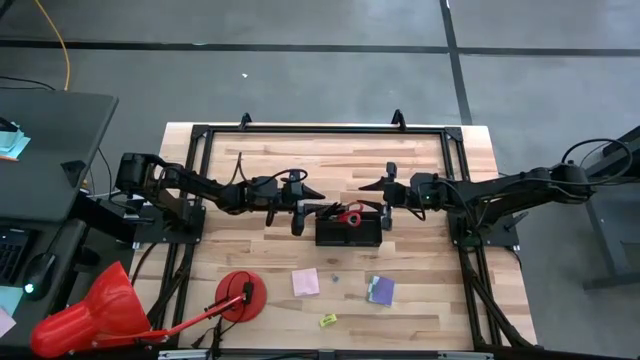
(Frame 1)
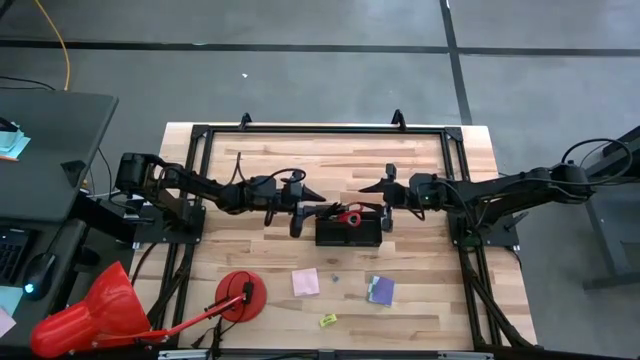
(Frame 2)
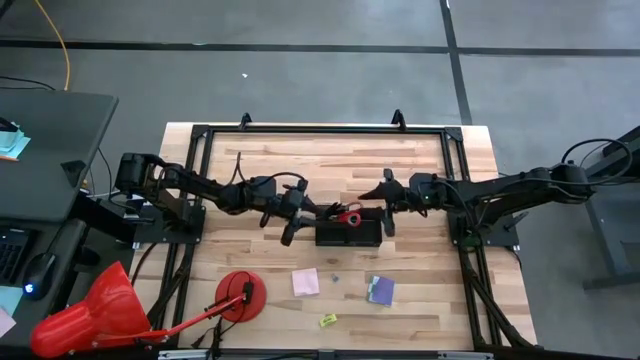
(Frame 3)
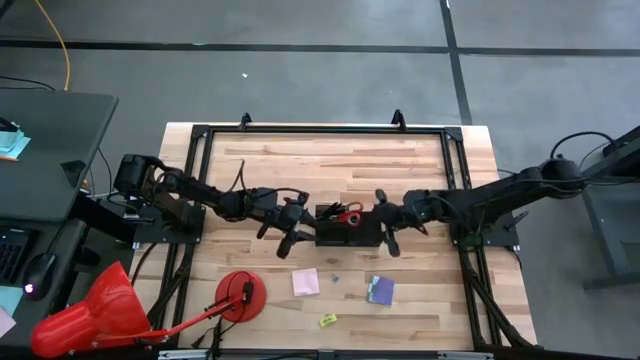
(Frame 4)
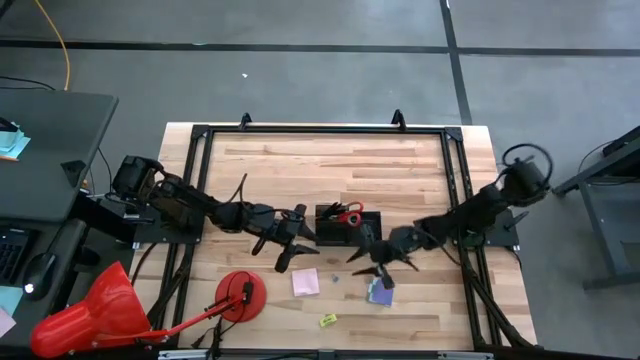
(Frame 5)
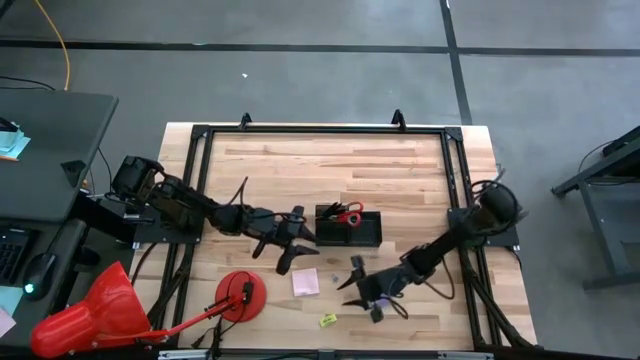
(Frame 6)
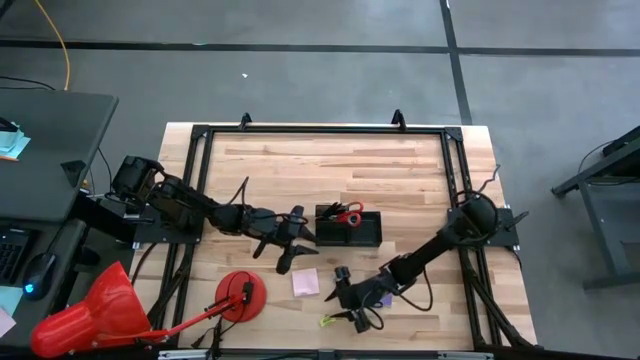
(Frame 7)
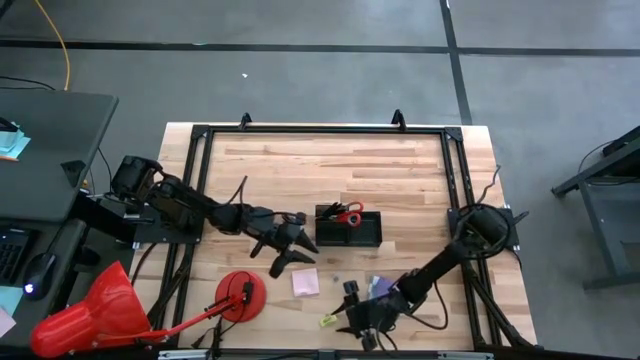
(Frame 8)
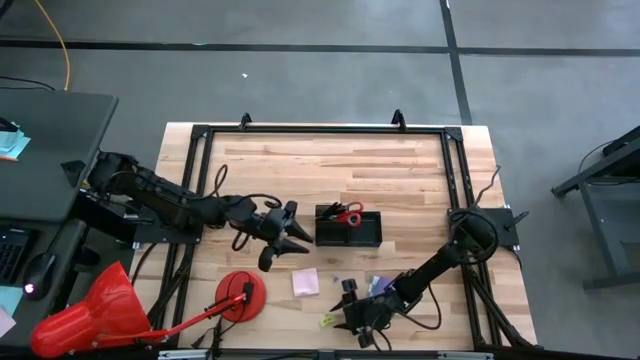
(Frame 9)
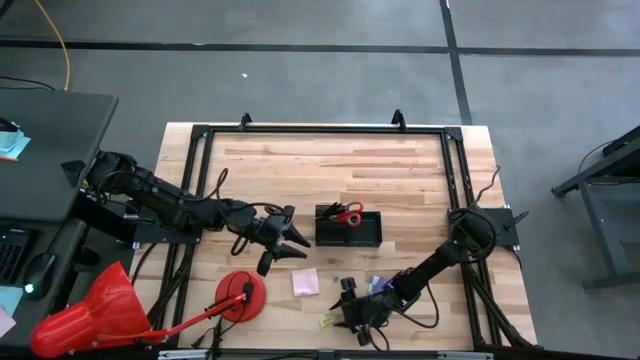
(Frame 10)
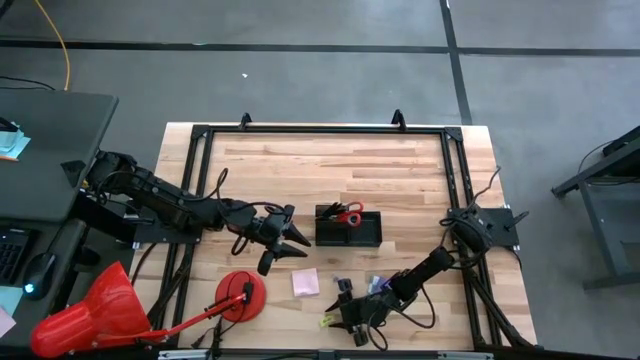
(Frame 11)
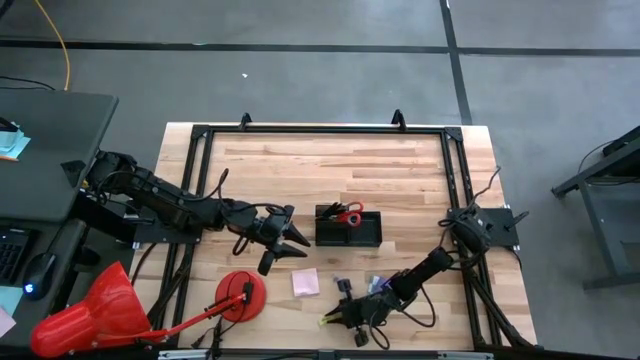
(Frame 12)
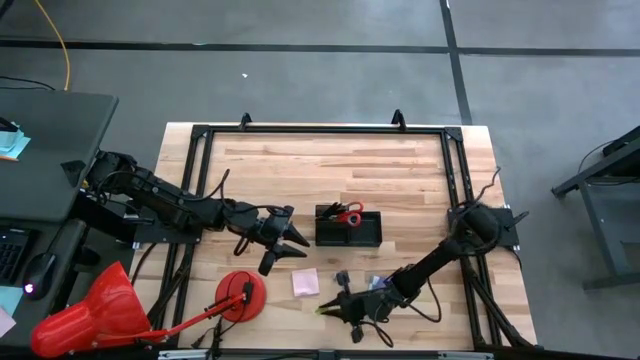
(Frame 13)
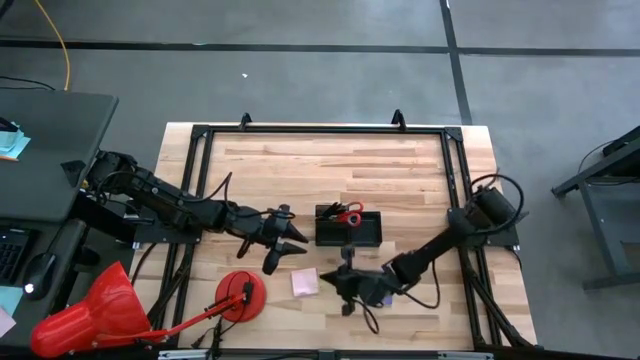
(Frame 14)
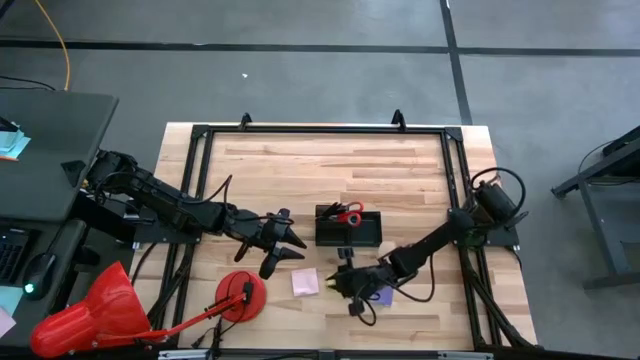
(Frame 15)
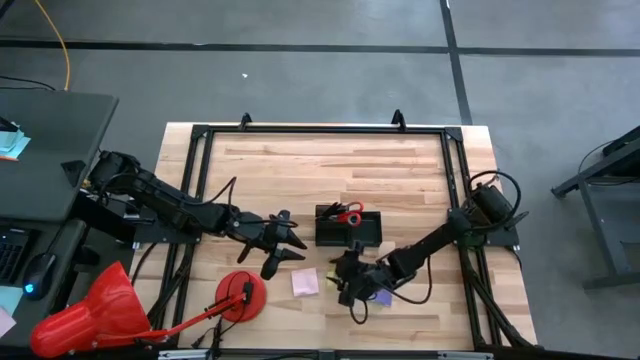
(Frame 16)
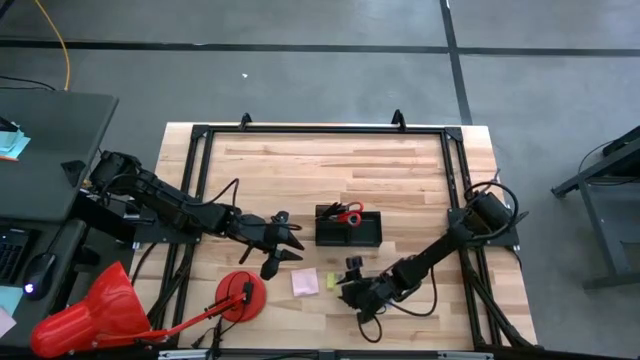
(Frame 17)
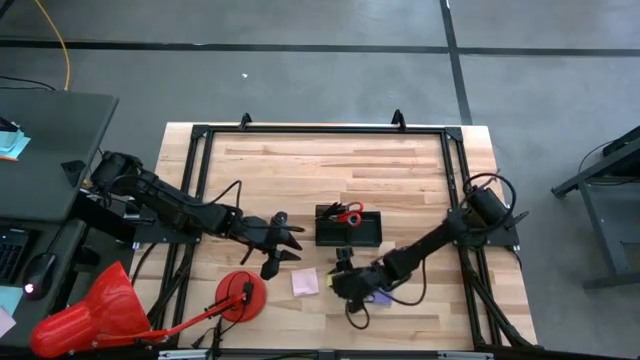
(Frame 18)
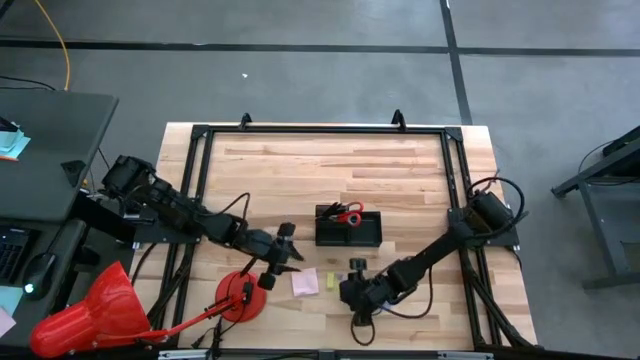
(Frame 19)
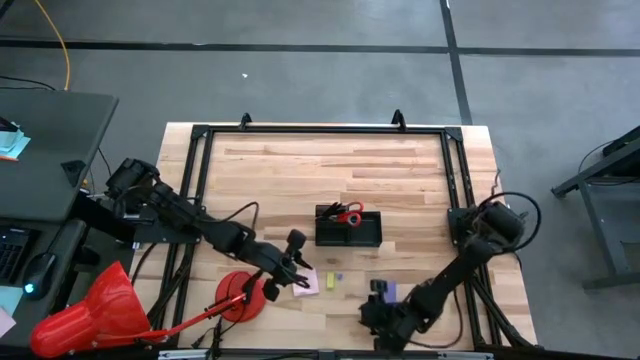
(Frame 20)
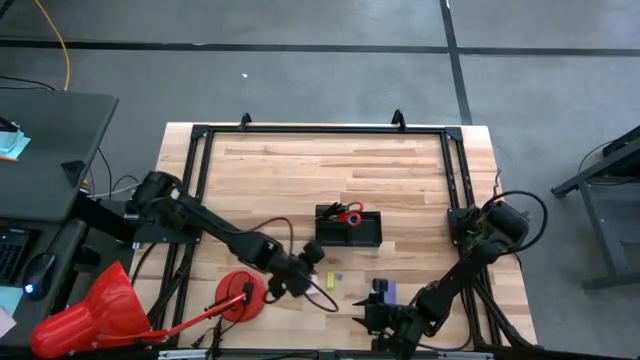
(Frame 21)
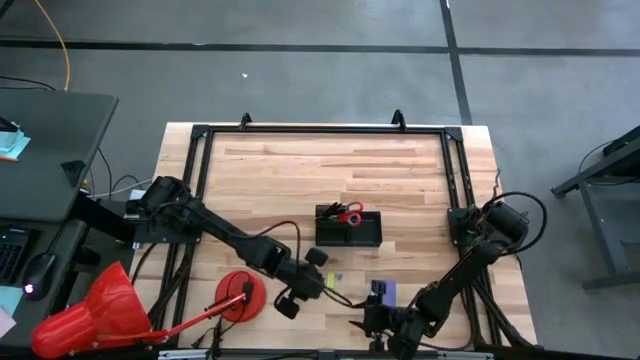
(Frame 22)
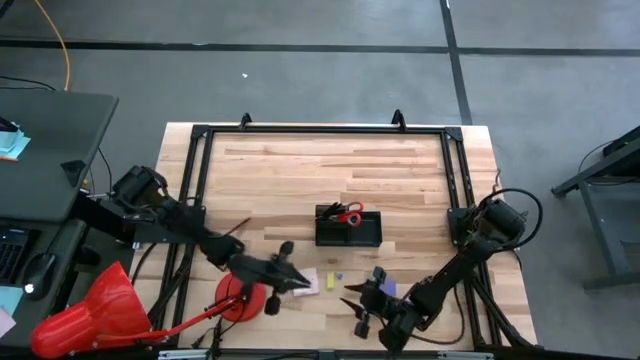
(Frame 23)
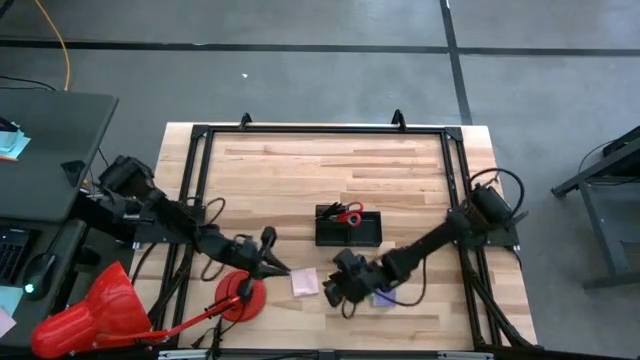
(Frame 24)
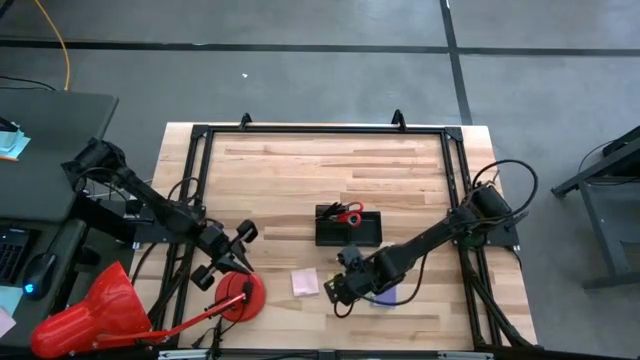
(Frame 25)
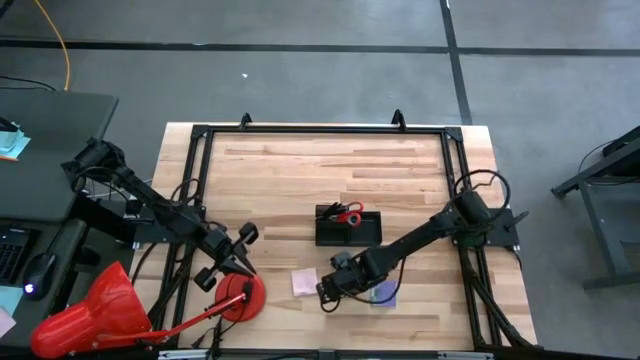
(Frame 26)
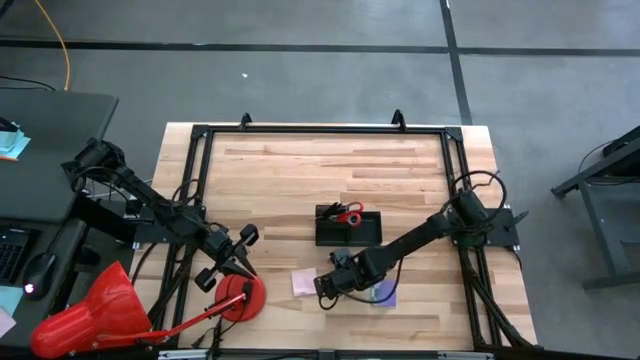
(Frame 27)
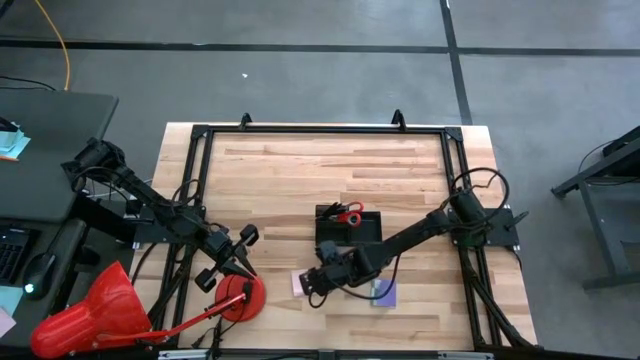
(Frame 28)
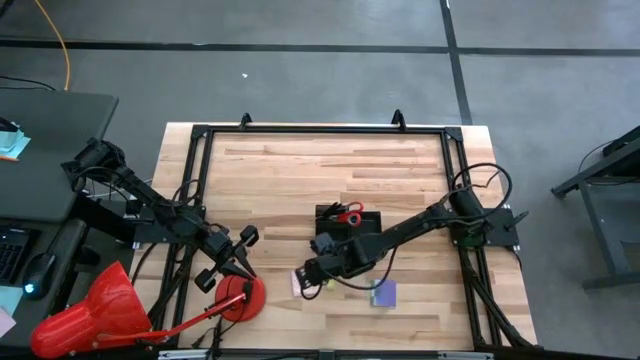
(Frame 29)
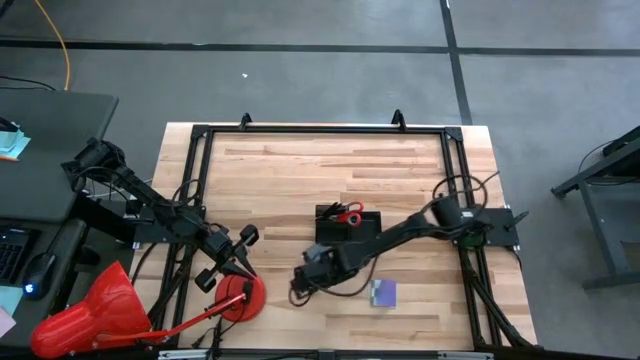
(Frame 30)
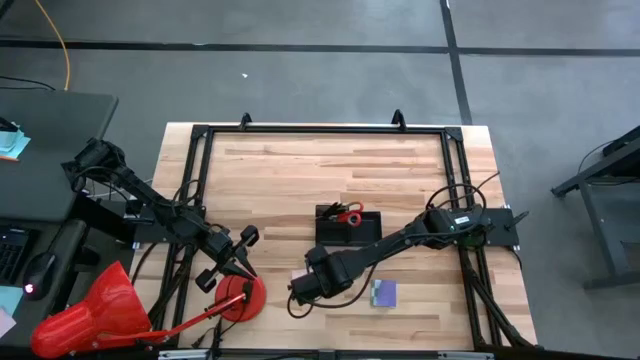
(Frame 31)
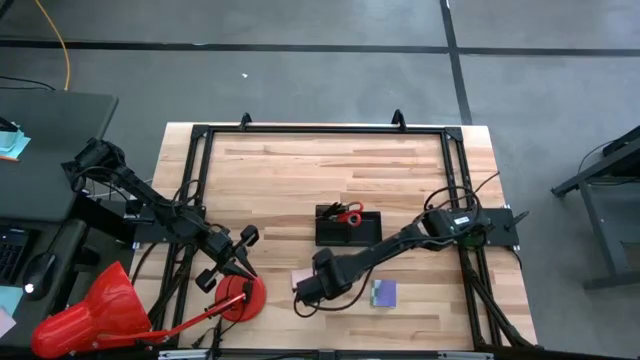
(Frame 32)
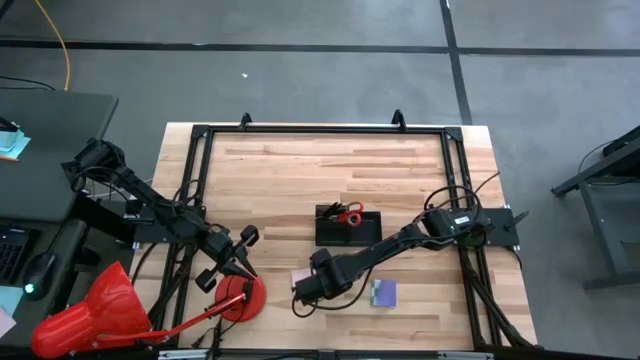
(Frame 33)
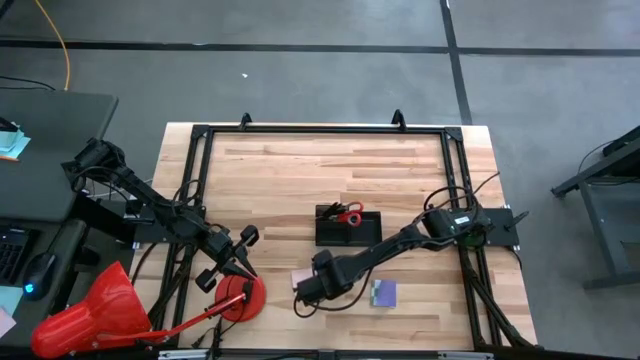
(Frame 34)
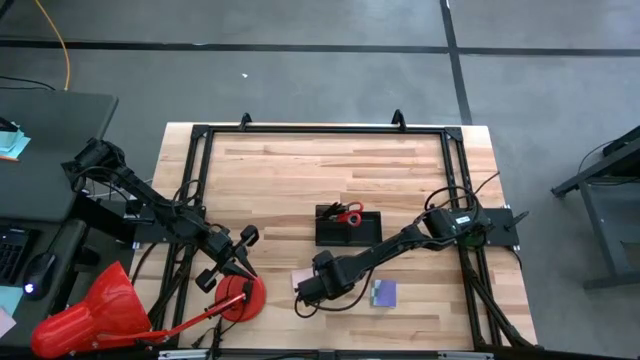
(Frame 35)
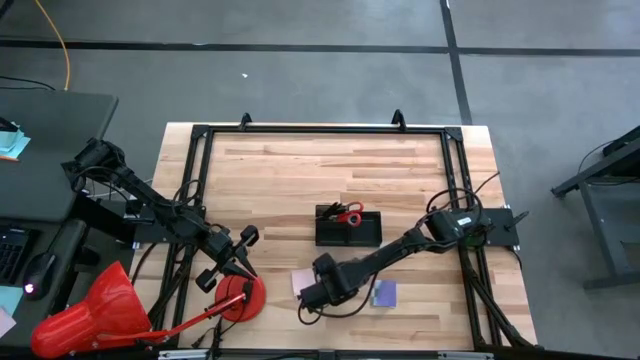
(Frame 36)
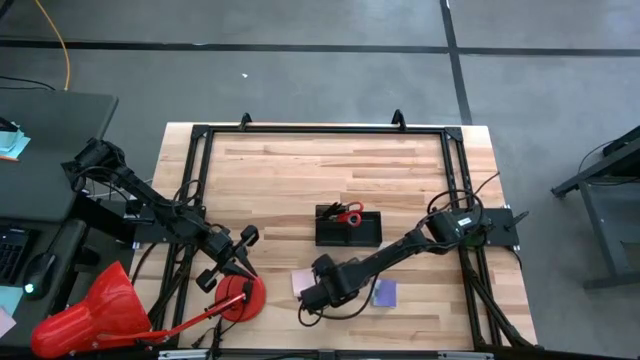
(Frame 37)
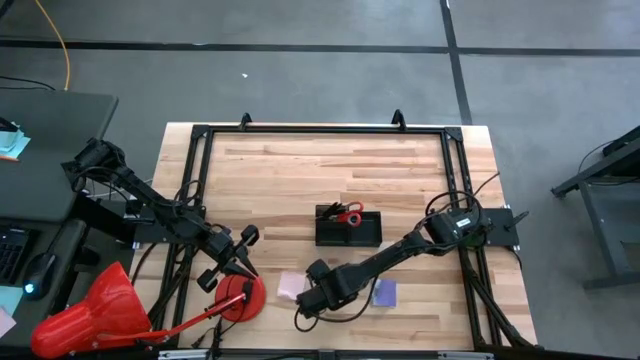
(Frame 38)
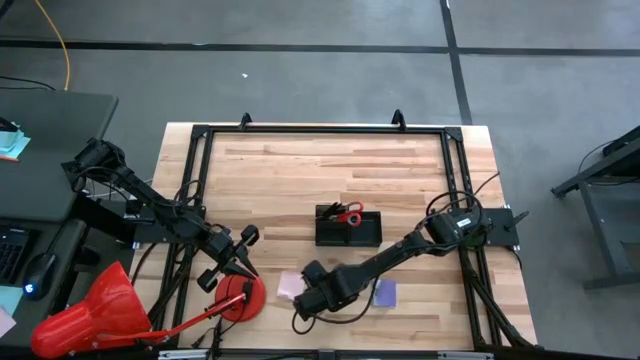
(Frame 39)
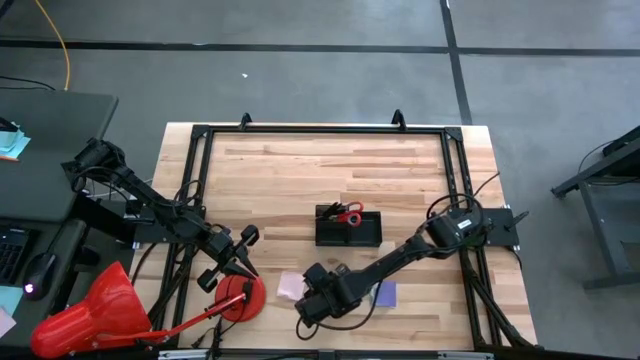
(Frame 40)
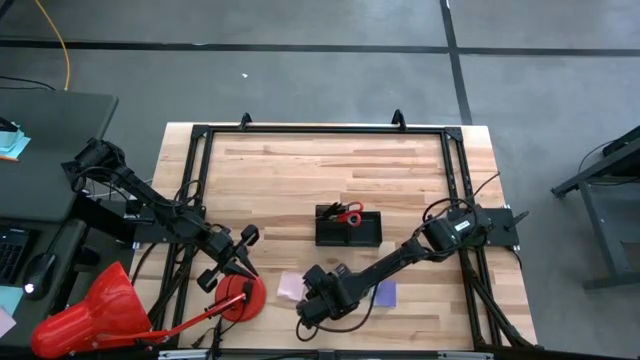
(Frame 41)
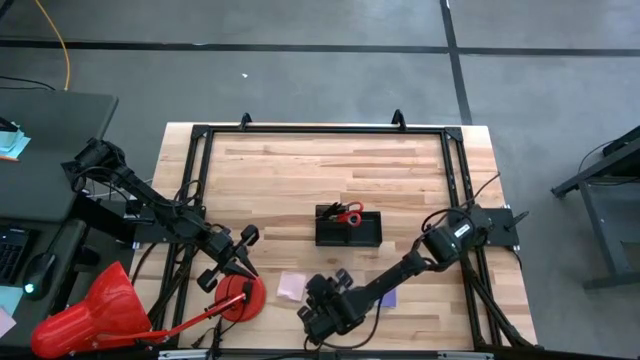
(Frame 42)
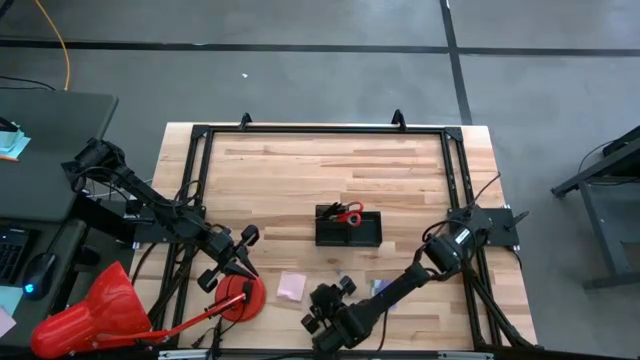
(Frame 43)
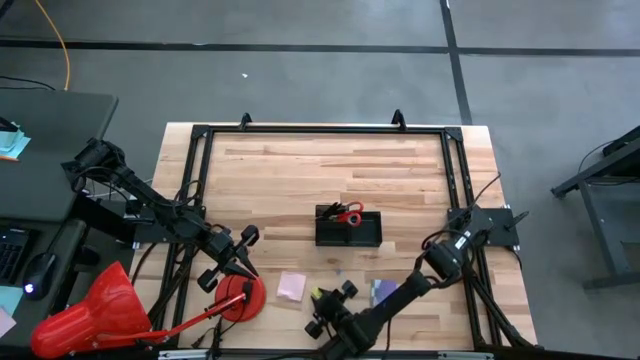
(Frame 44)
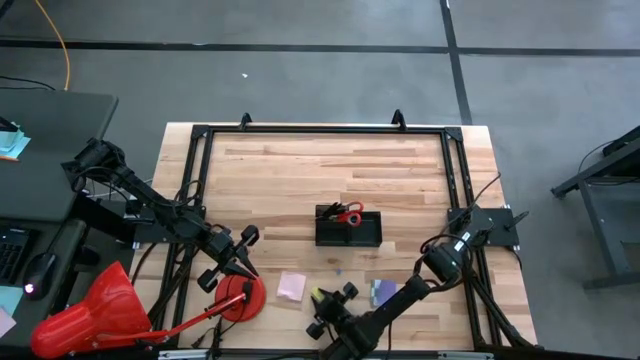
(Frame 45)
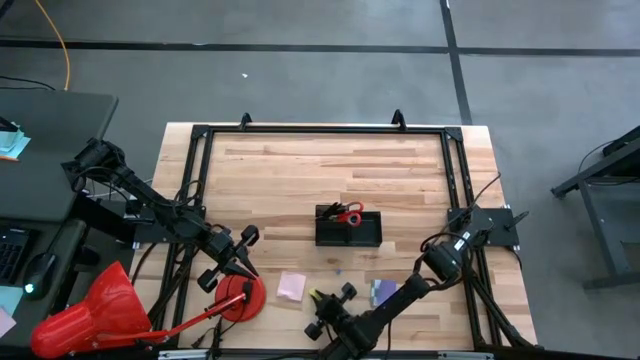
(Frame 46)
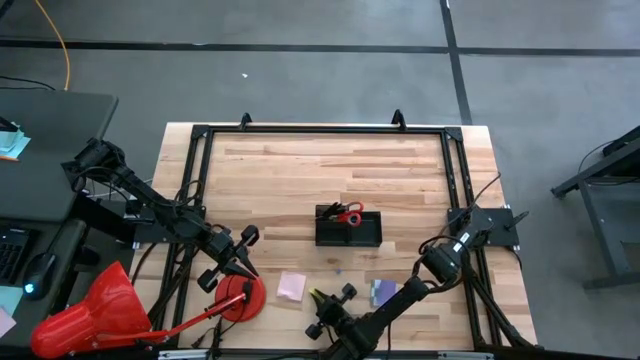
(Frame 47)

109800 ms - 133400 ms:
Task: Pick and place office supplies into organizer
Put the yellow eraser into the black desk organizer
